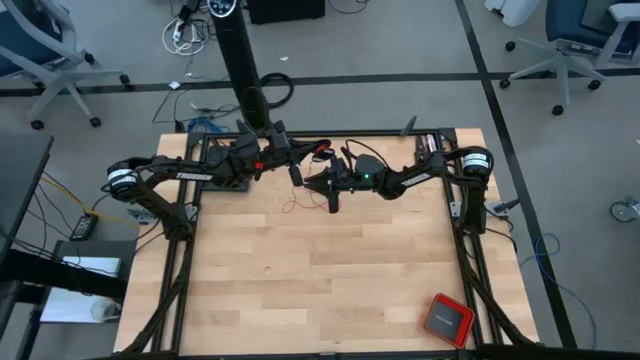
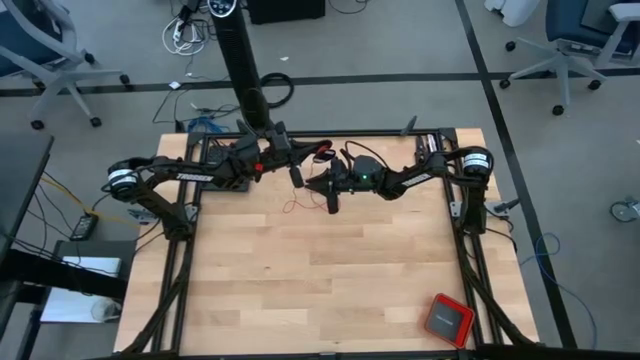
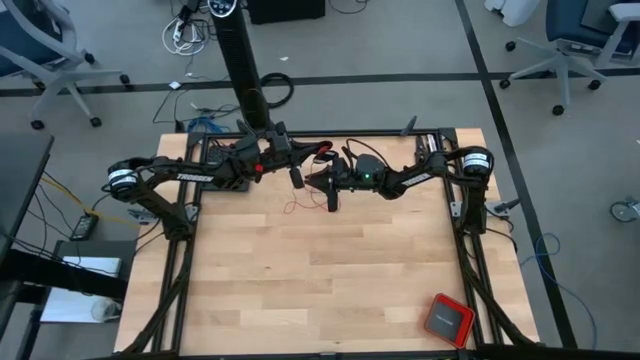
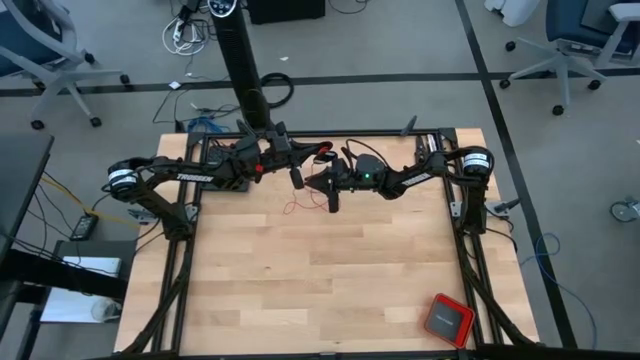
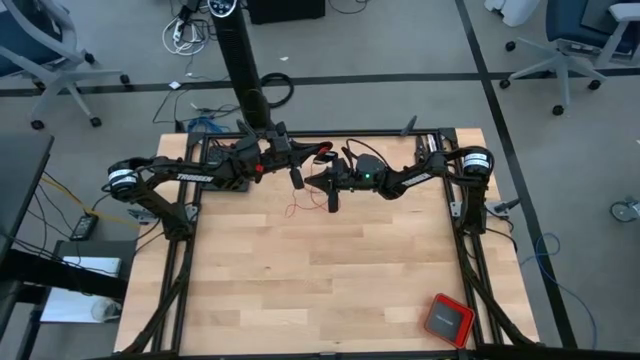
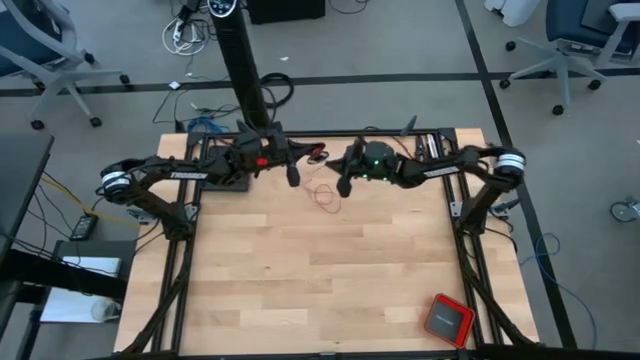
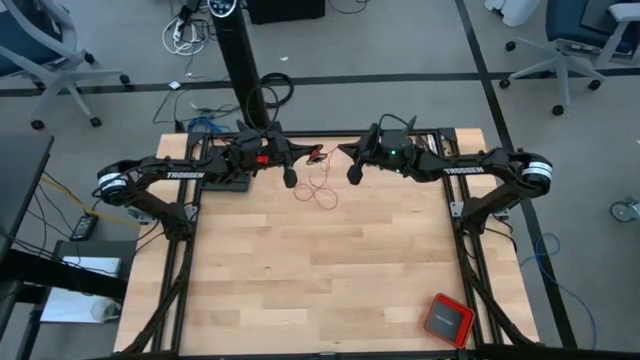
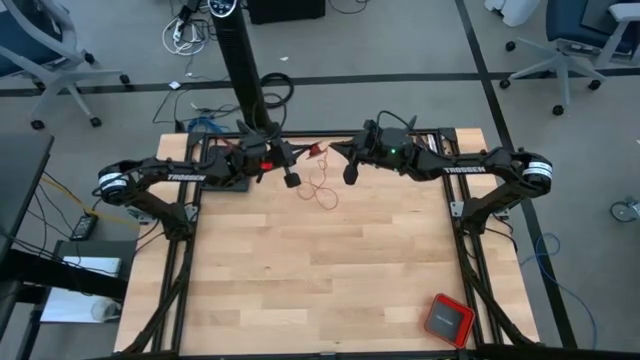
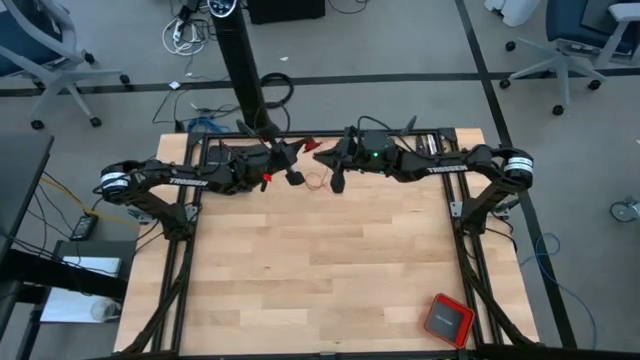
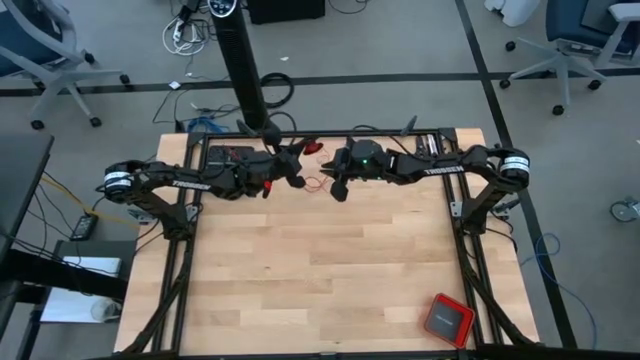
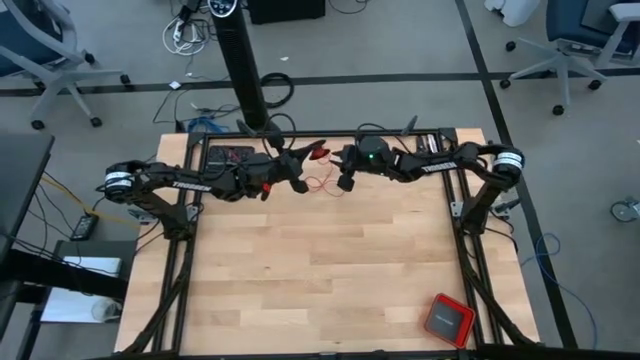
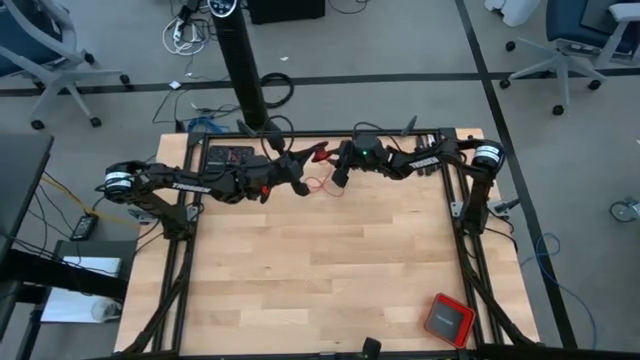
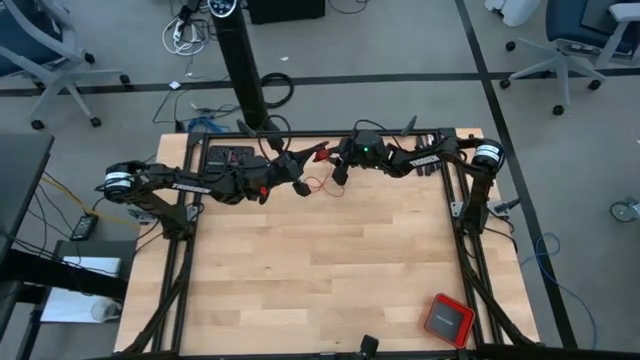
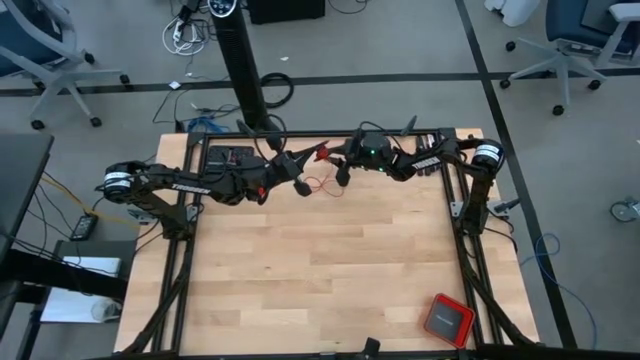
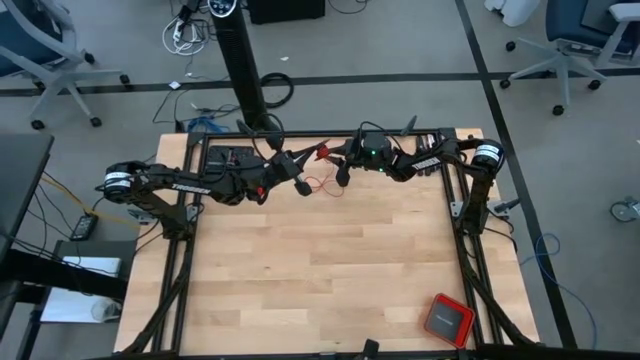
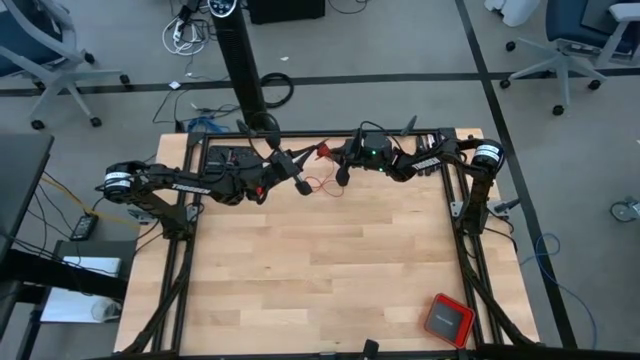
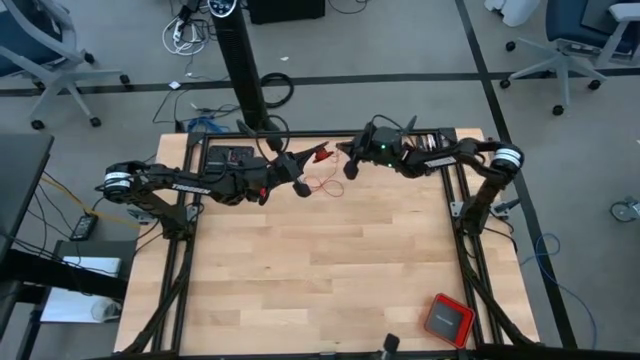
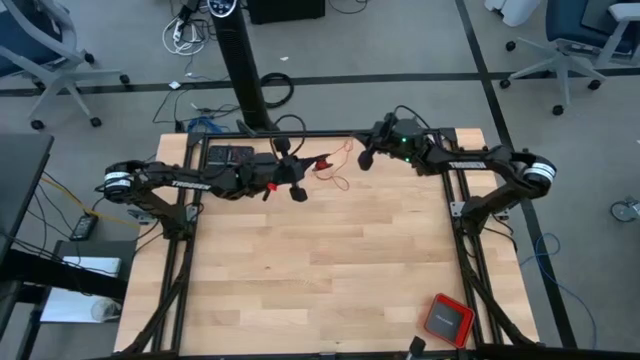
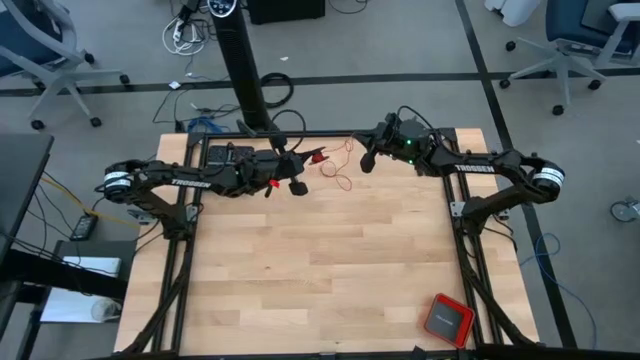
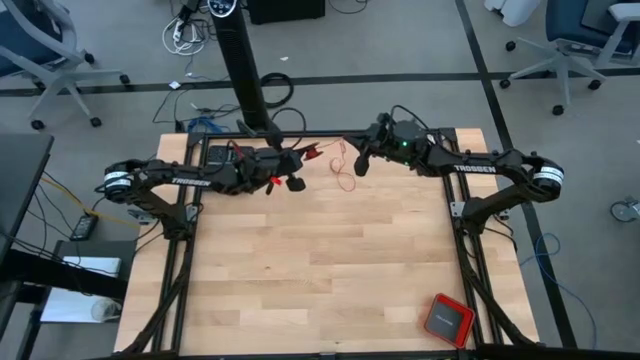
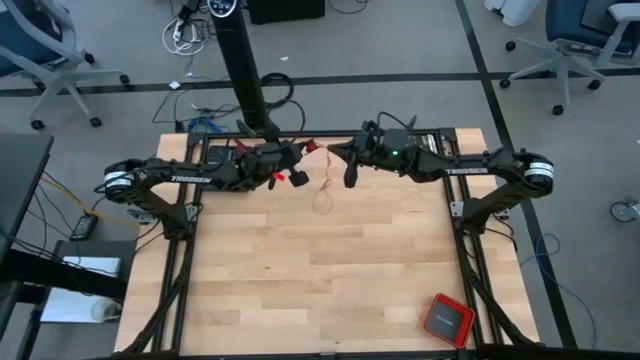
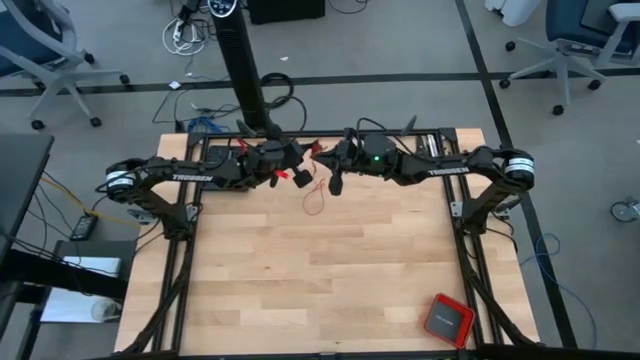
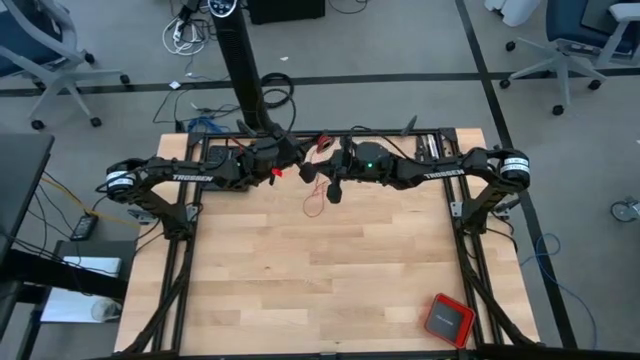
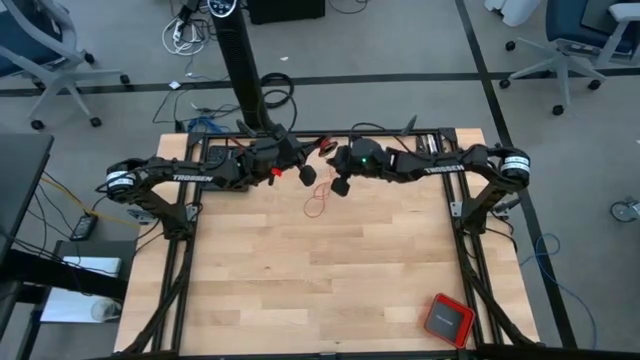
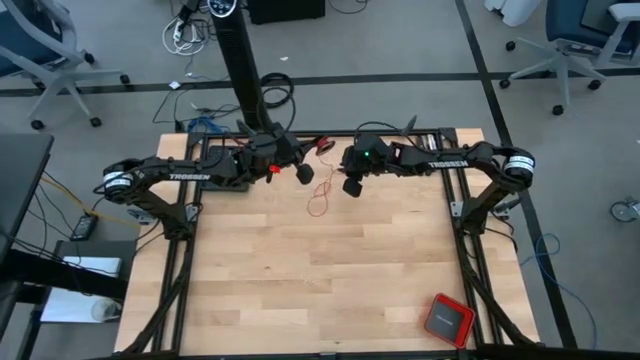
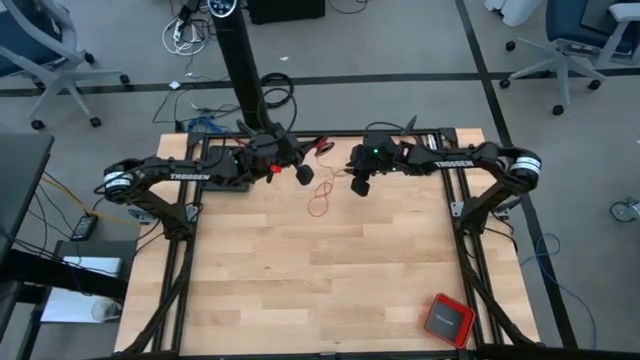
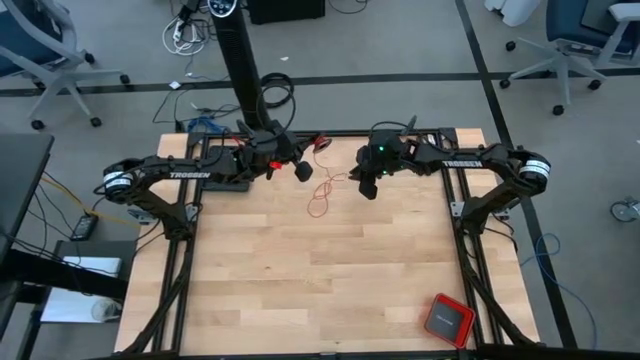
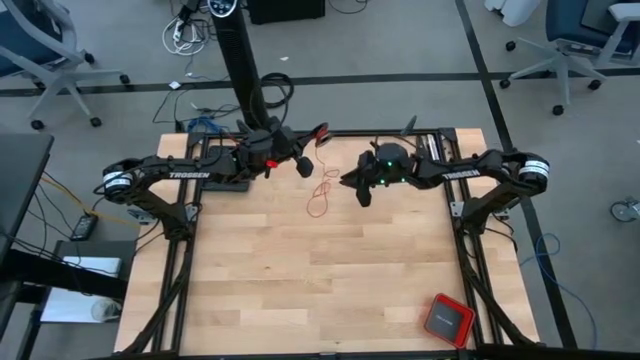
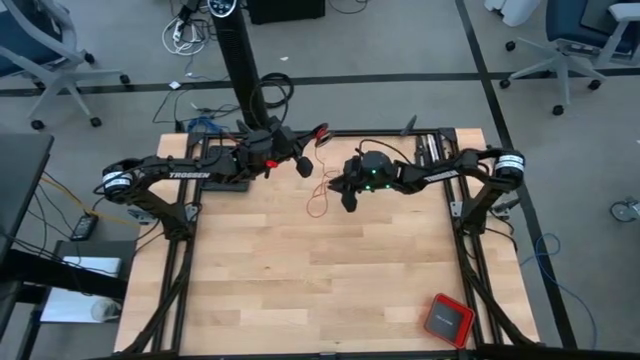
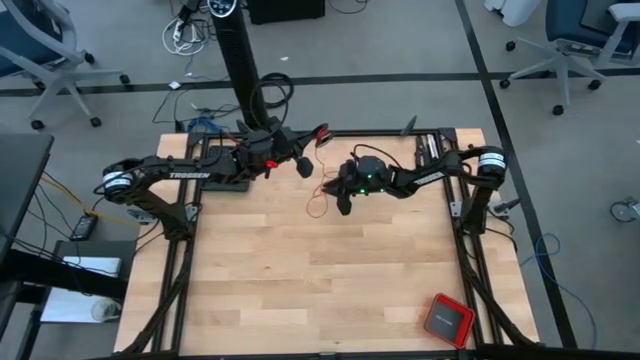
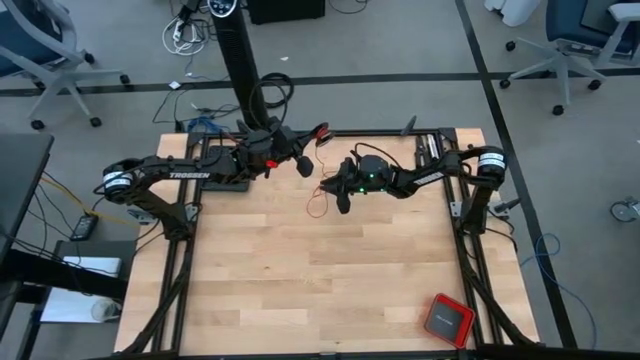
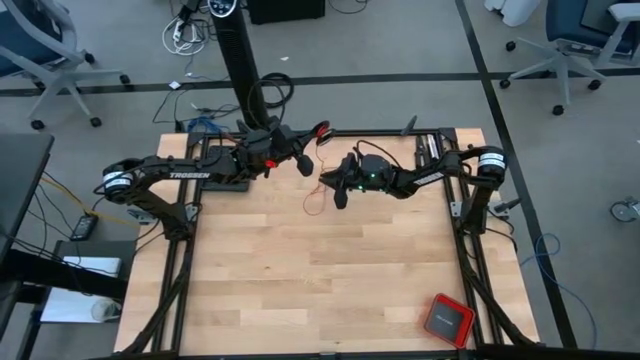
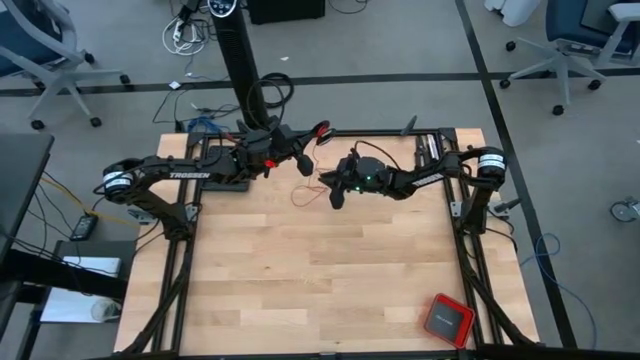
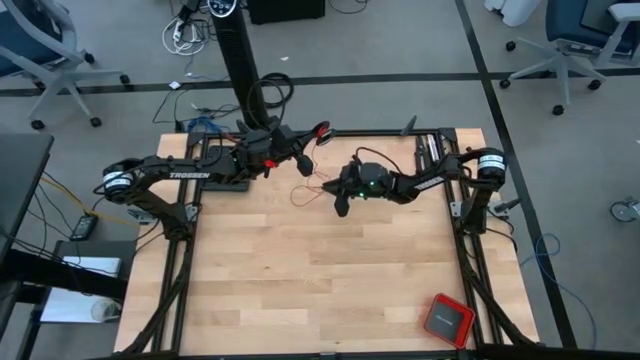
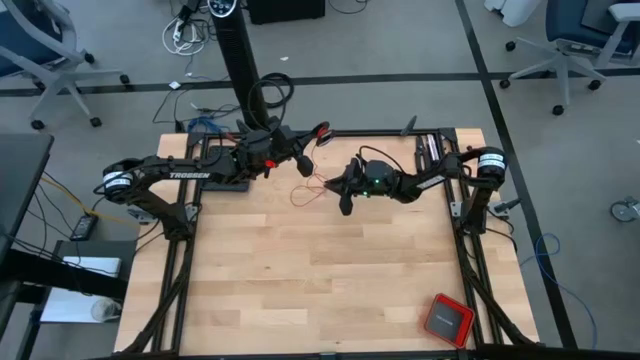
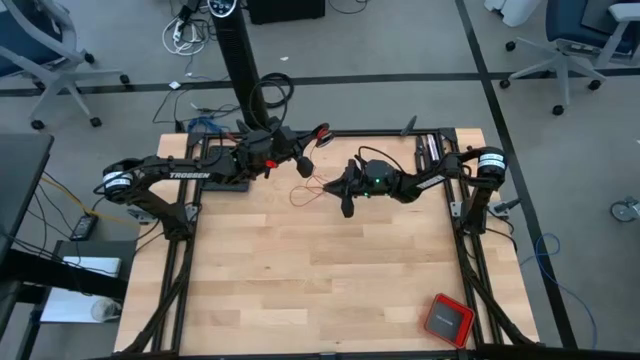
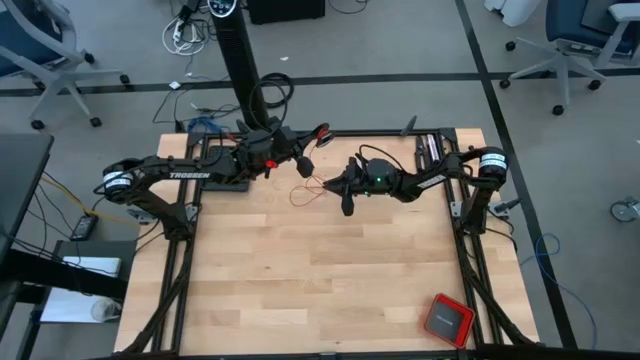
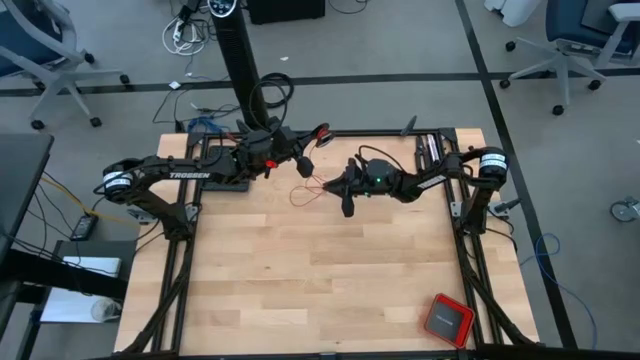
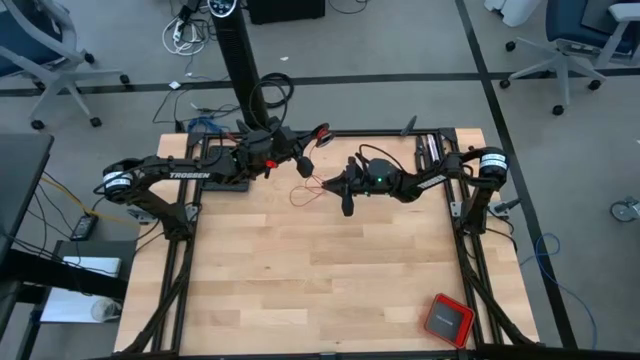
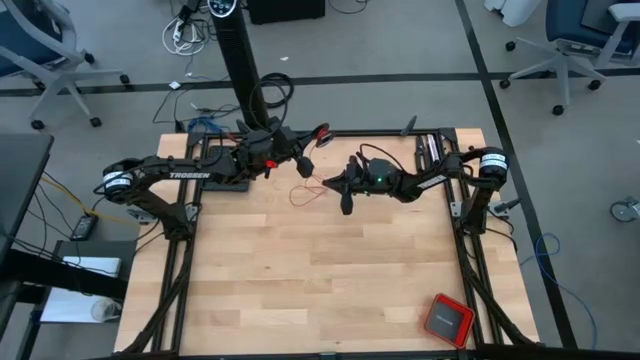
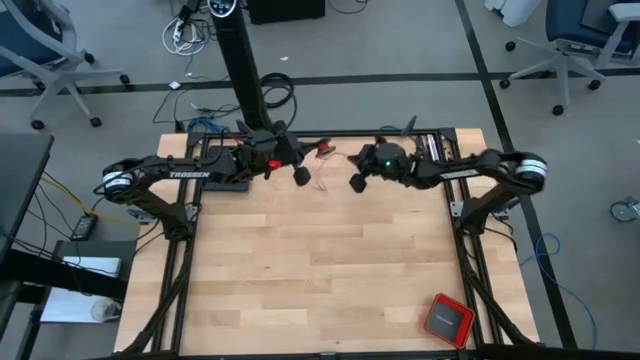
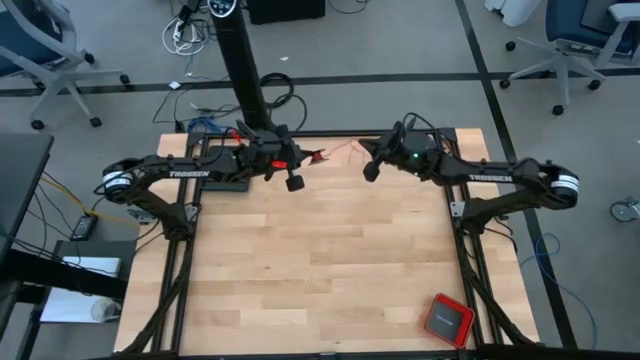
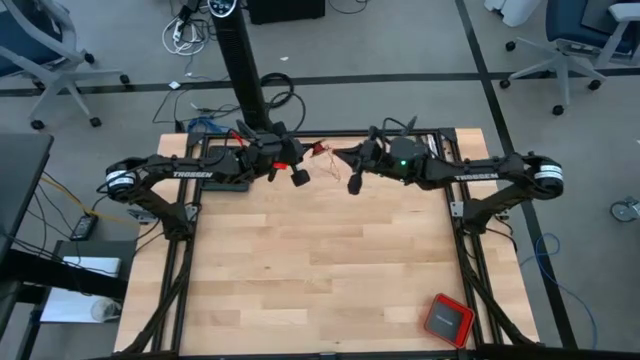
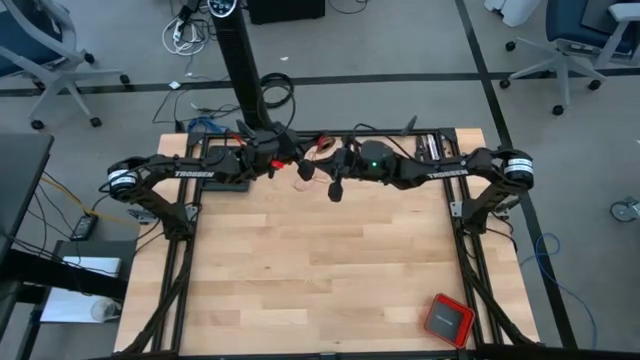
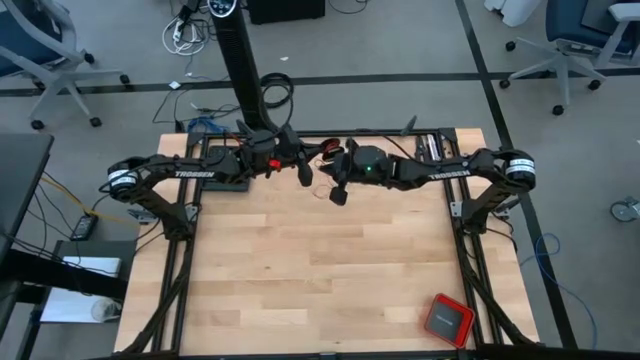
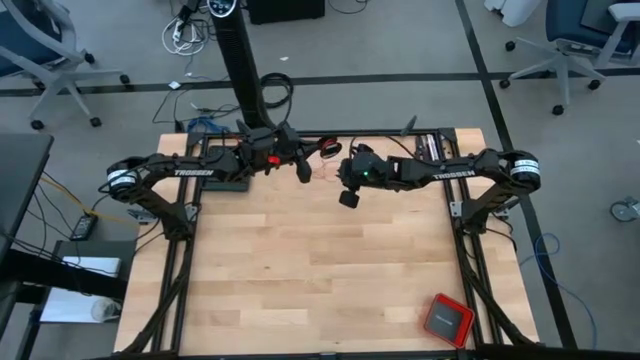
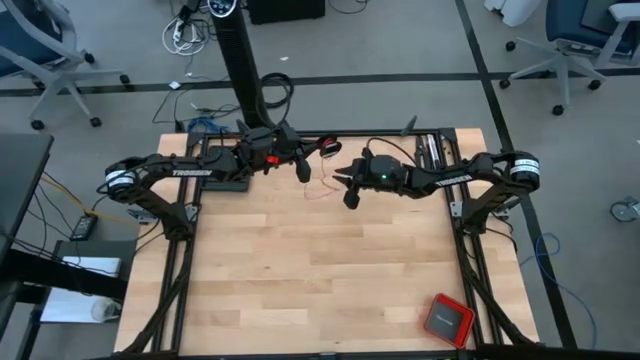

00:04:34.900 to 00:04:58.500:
Task: Coil cords
Coil the red wire onto the spool
